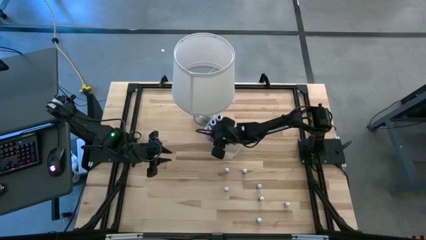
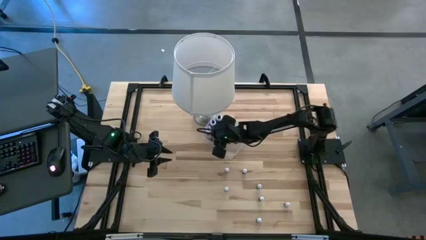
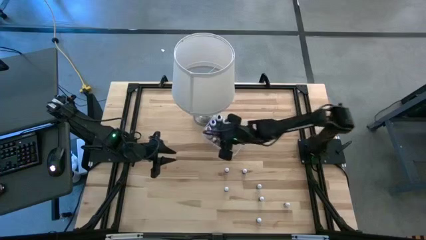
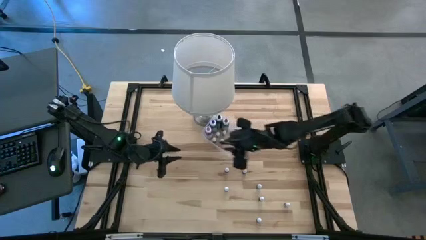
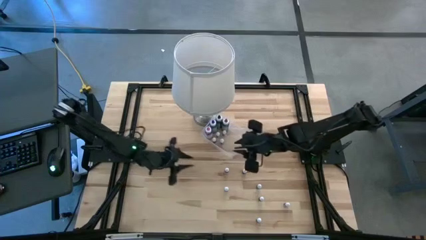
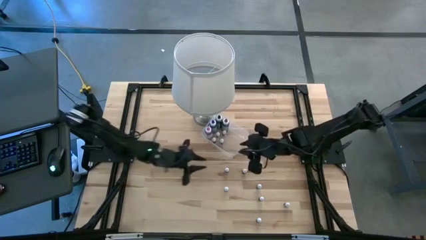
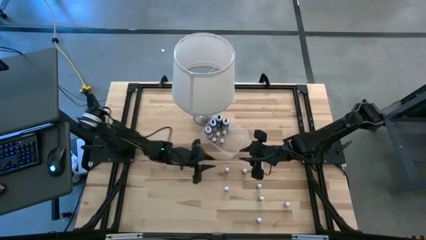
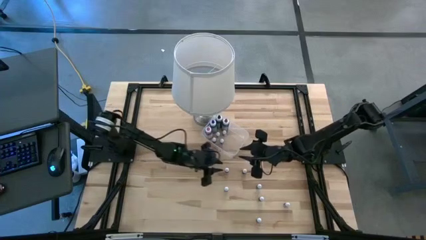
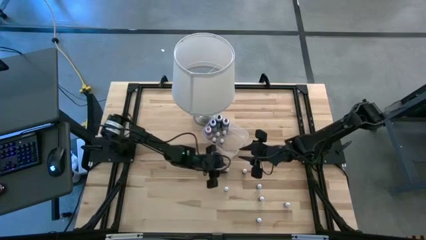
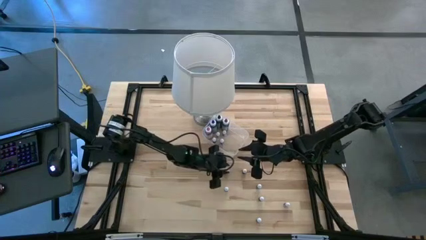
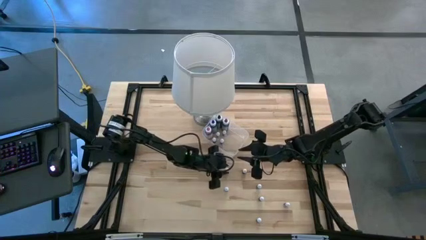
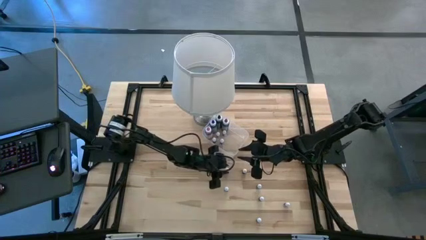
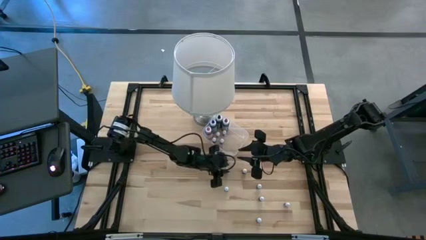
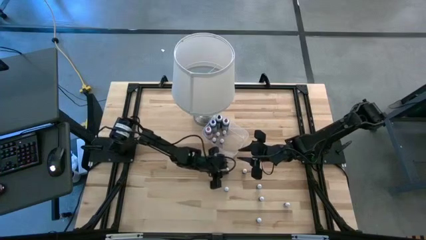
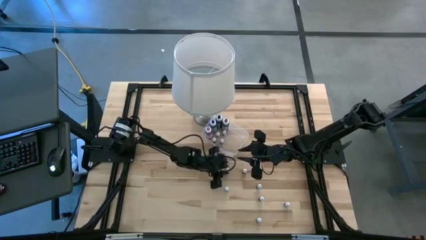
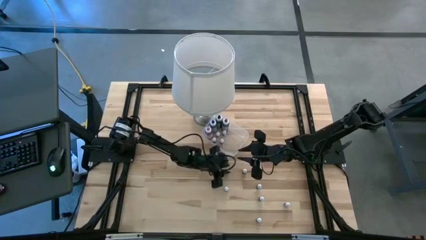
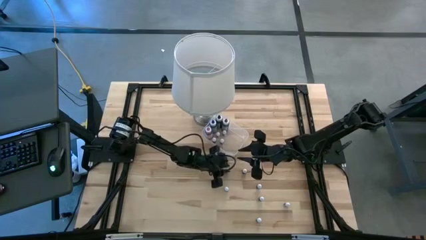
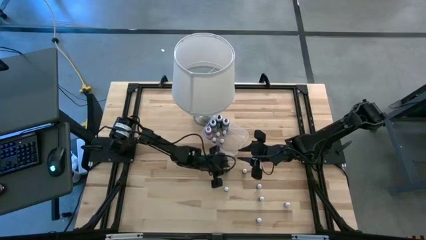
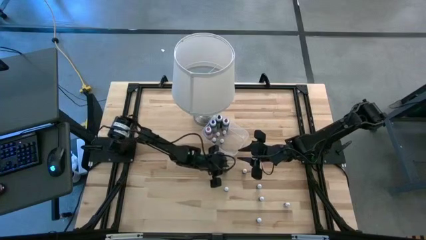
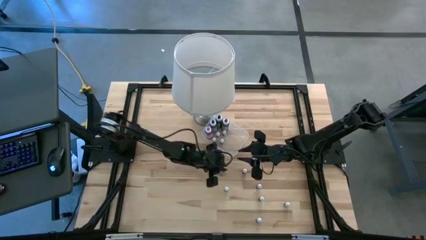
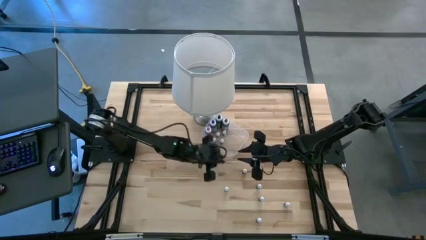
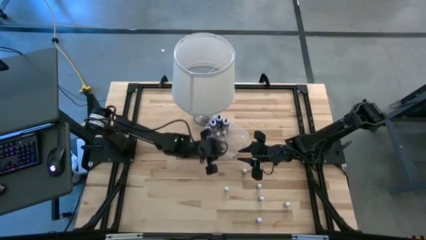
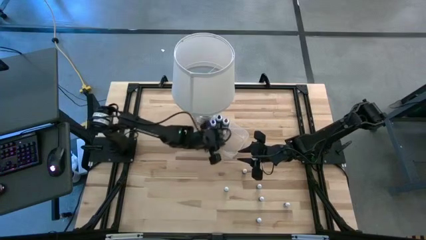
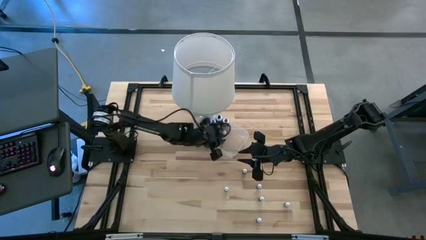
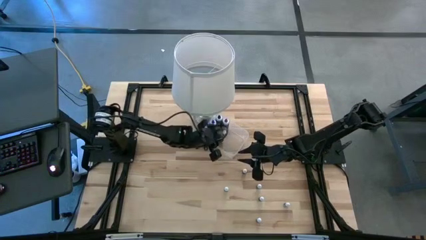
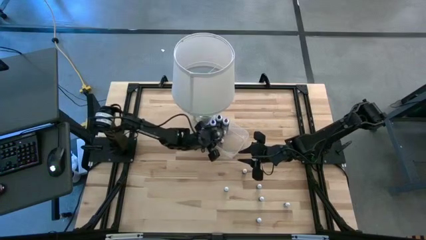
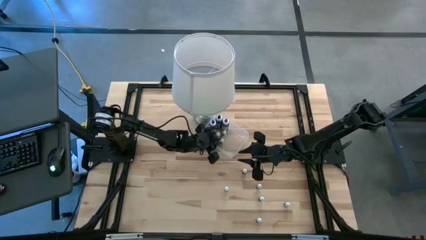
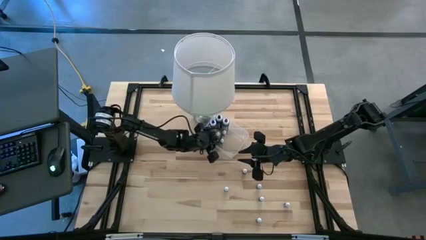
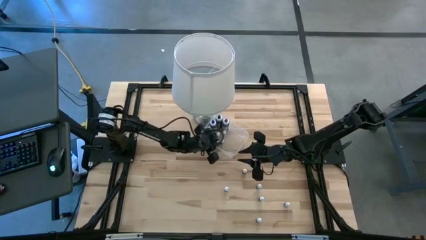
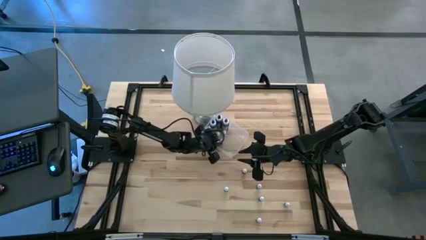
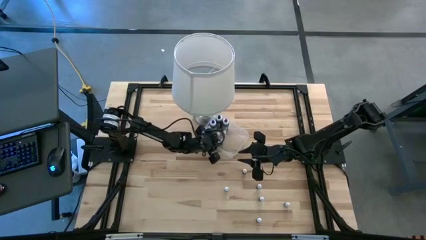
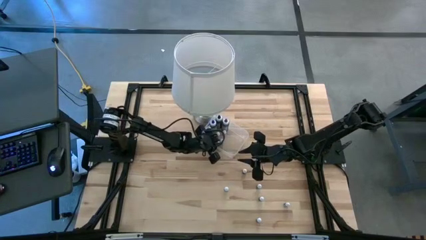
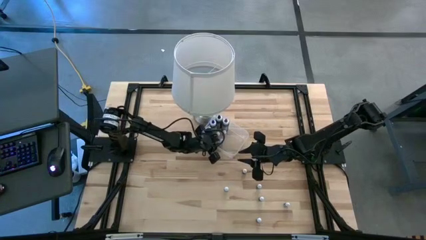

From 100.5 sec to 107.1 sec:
Task: Pick & Place food coloring
Put the small dark green food coloring bottle into the transparent bin

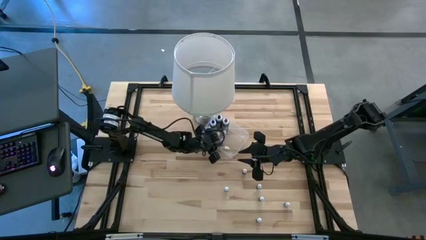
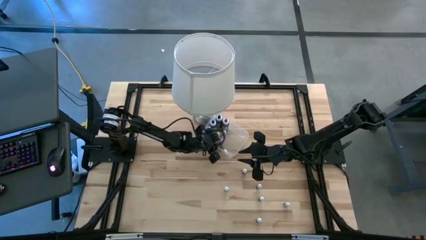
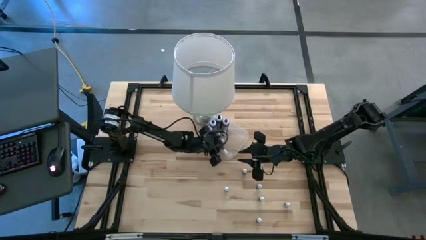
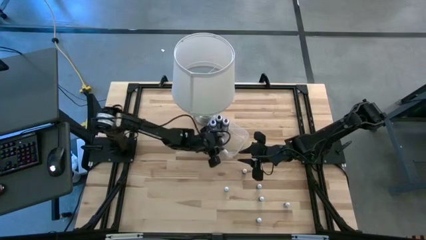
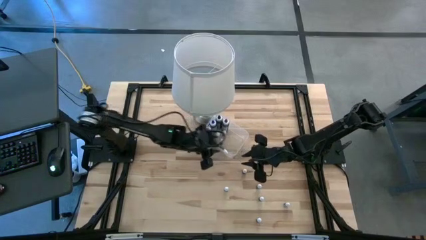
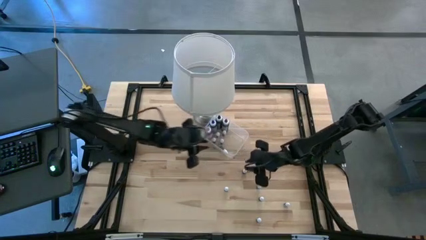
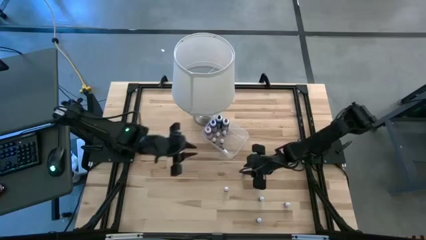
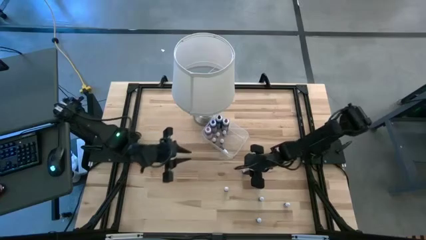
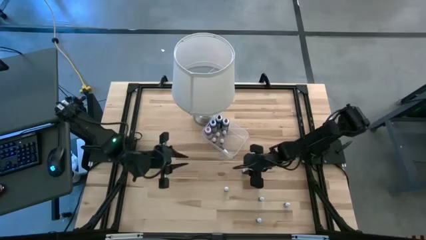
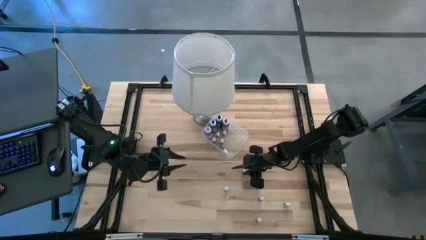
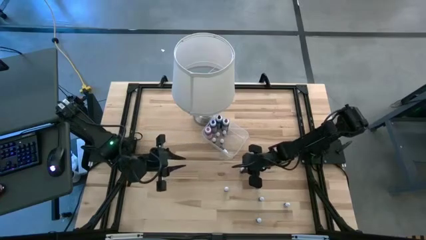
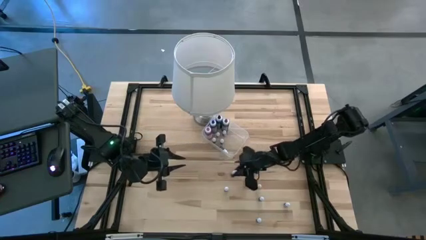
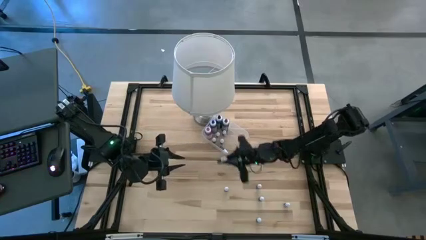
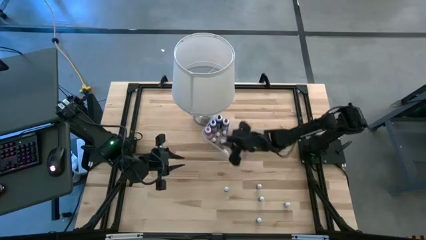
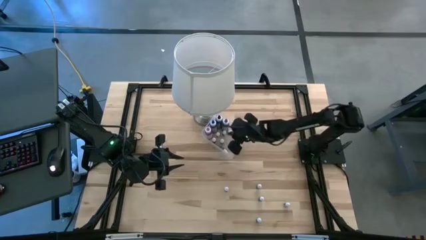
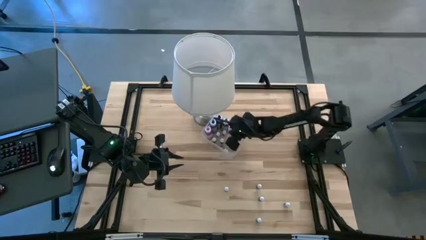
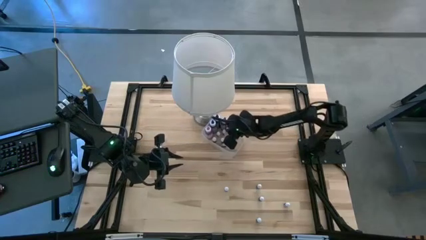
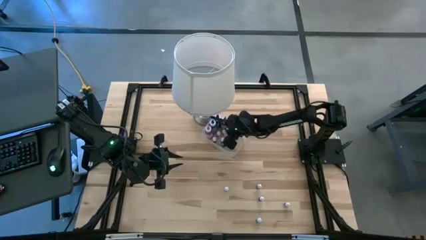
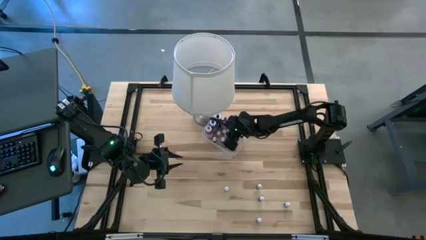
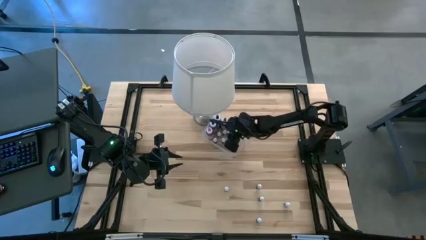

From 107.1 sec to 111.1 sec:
Put the top small red food coloring bottle into the transparent bin

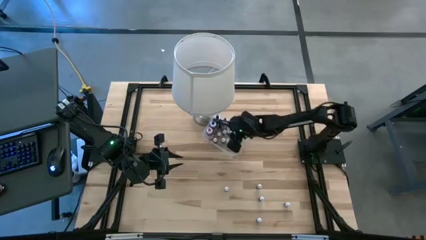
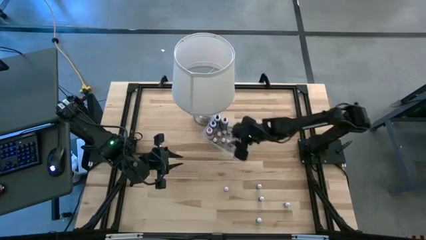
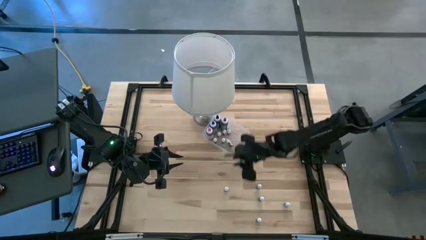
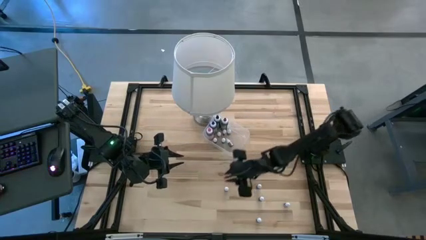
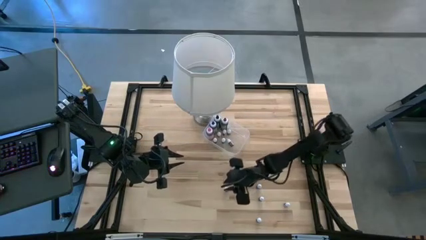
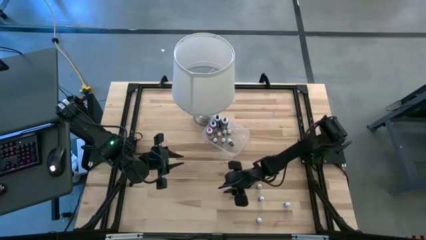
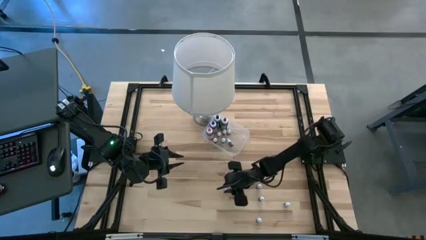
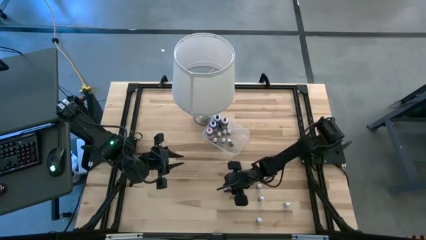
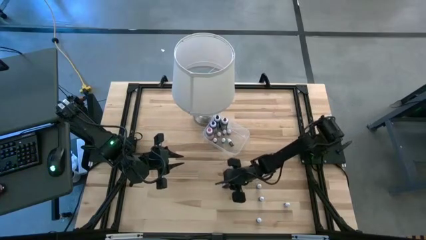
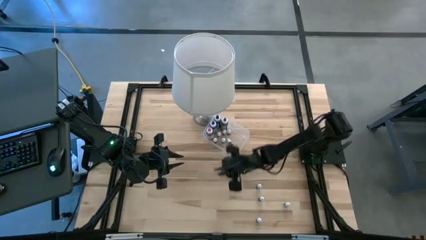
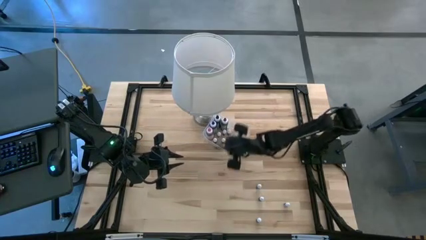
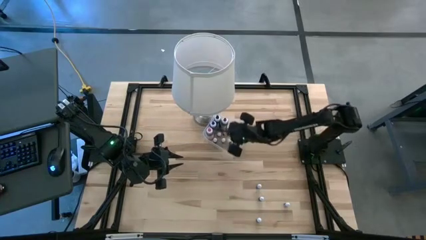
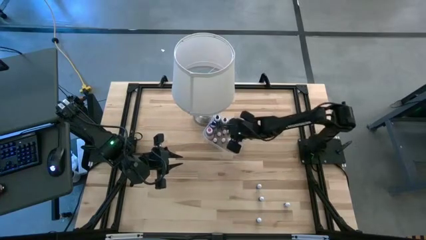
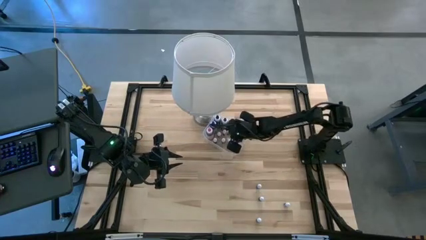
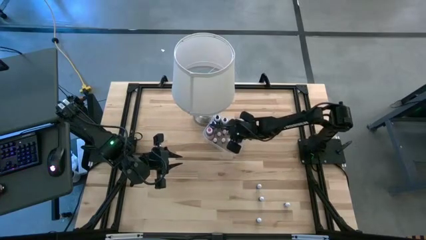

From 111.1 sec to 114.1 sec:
Put the top small violet food coloring bottle into the transparent bin

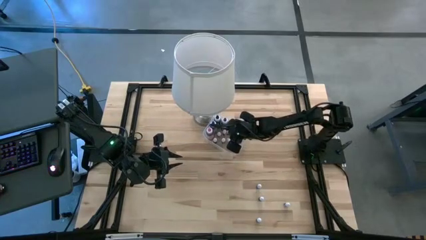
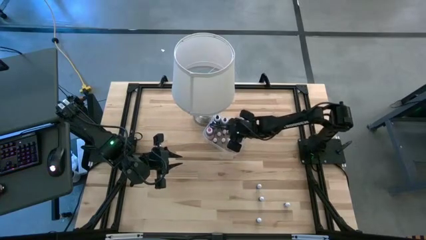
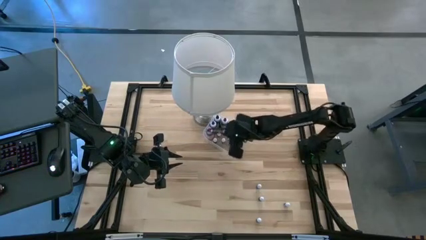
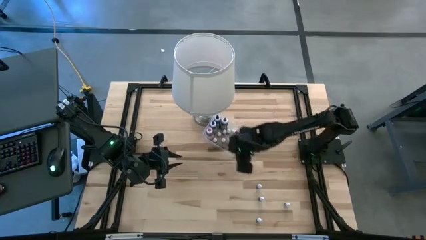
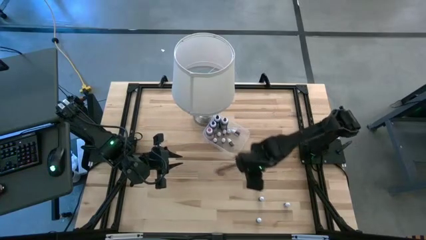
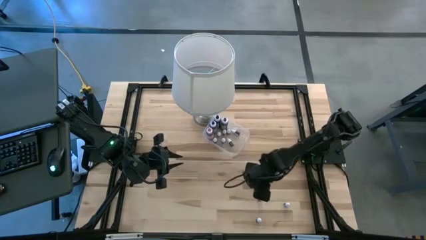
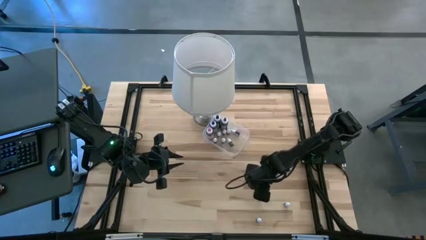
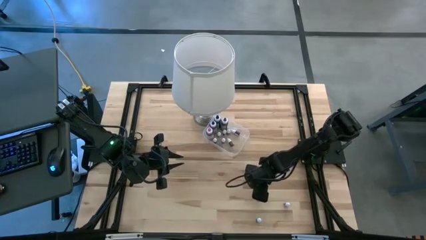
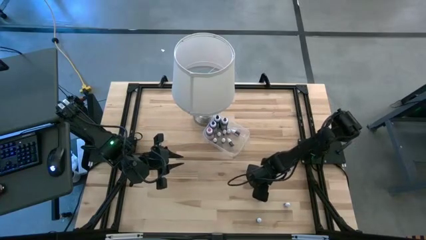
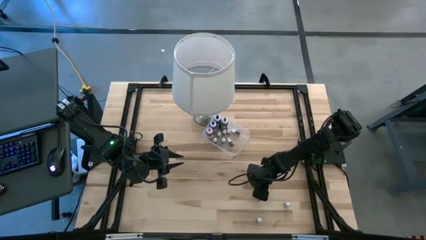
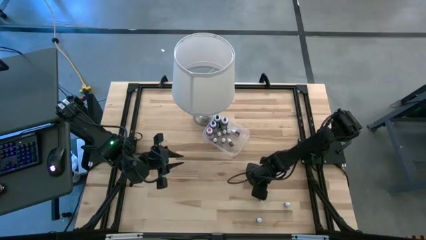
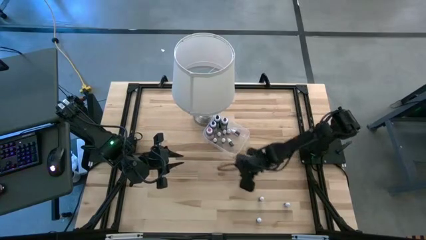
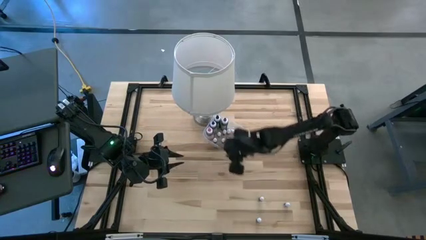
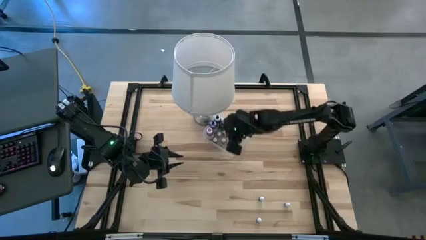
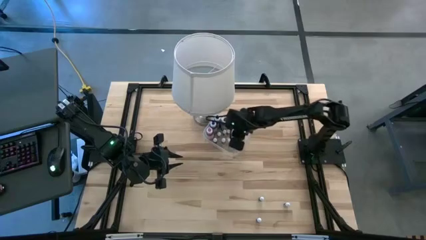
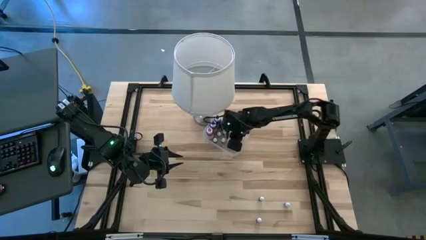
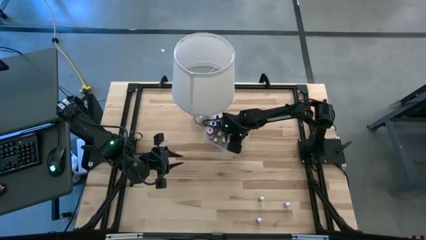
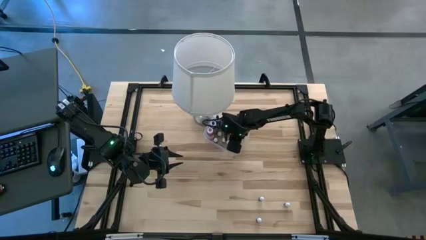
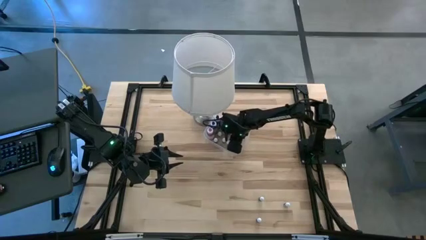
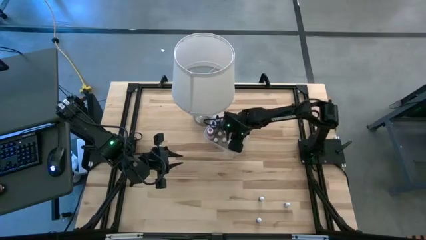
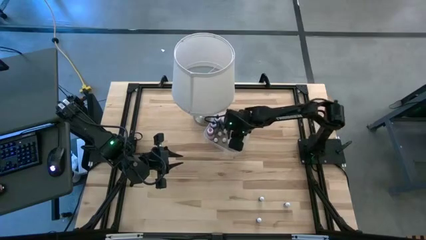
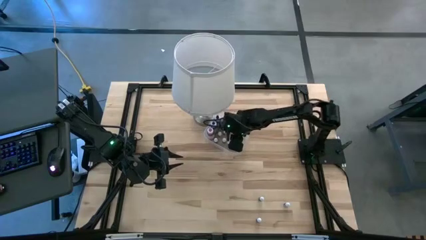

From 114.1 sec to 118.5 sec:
Put the small blue food coloring bottle into the transparent bin
